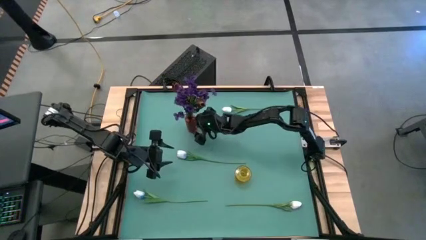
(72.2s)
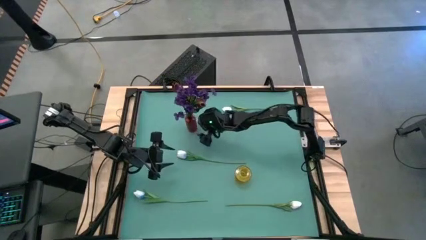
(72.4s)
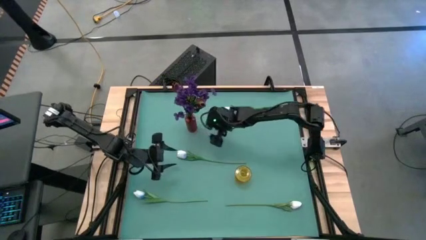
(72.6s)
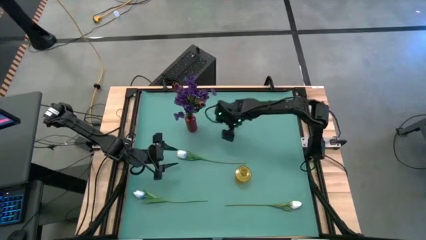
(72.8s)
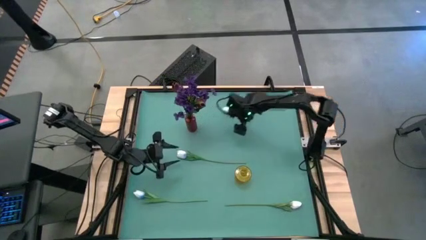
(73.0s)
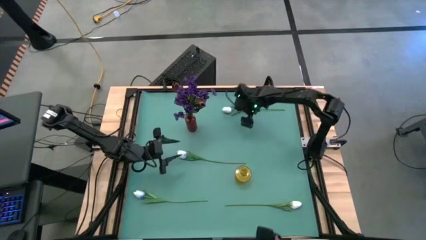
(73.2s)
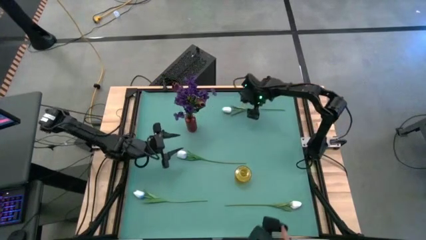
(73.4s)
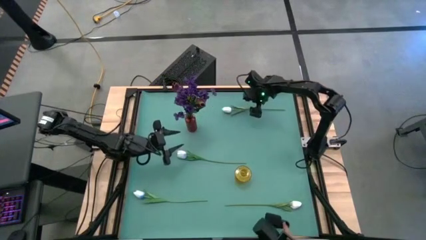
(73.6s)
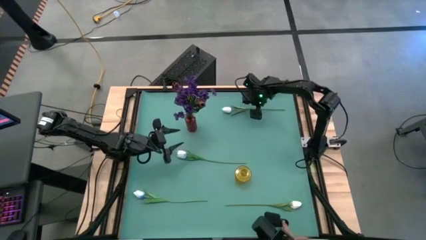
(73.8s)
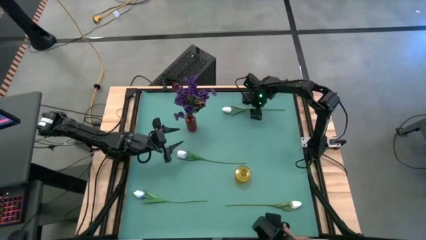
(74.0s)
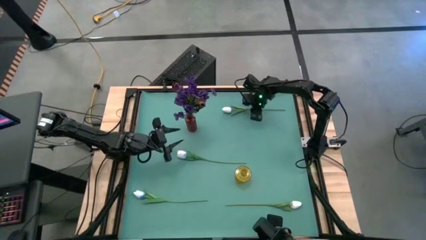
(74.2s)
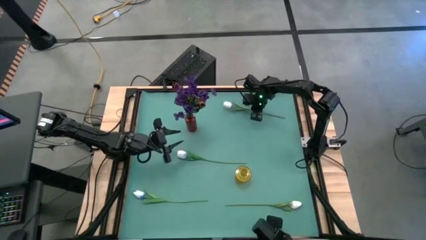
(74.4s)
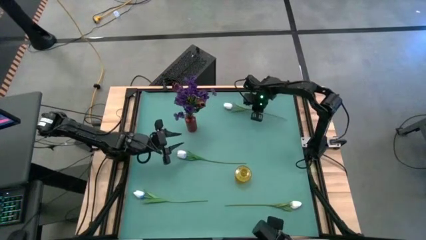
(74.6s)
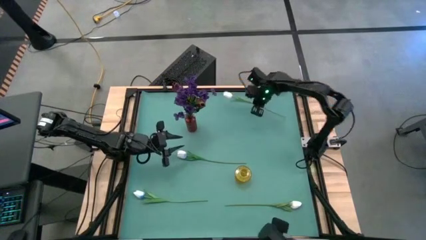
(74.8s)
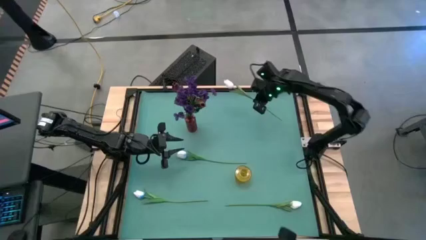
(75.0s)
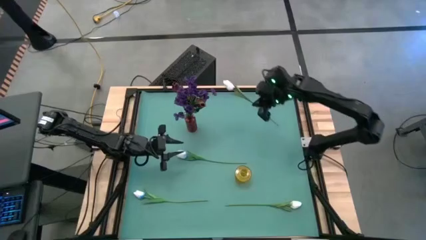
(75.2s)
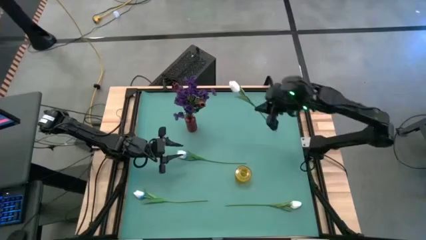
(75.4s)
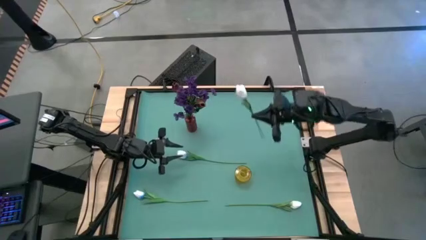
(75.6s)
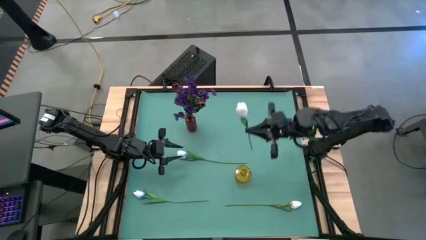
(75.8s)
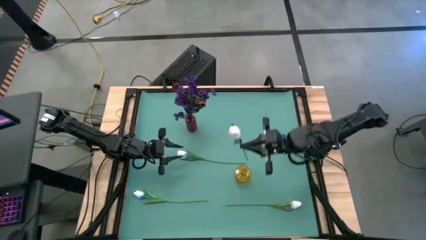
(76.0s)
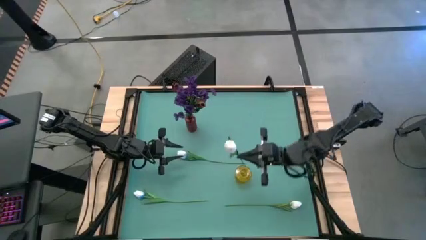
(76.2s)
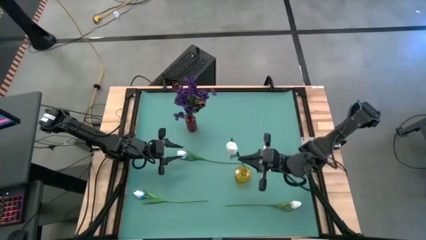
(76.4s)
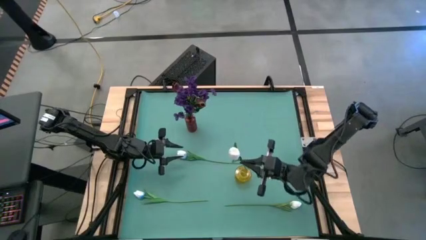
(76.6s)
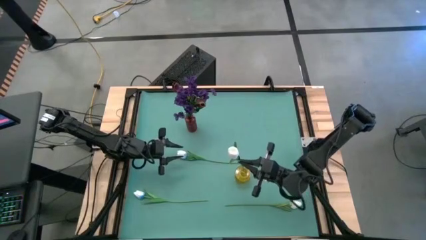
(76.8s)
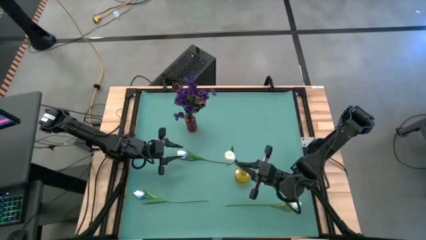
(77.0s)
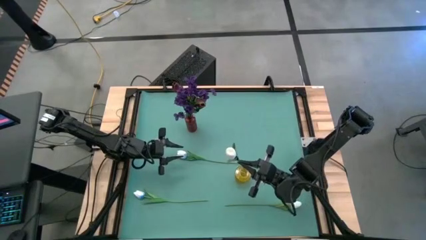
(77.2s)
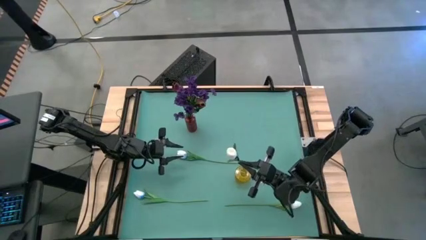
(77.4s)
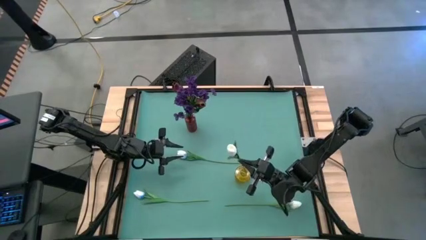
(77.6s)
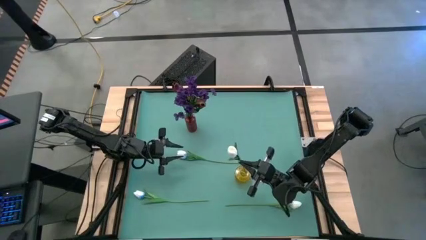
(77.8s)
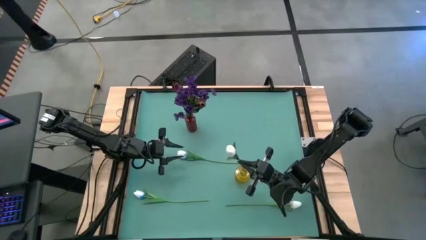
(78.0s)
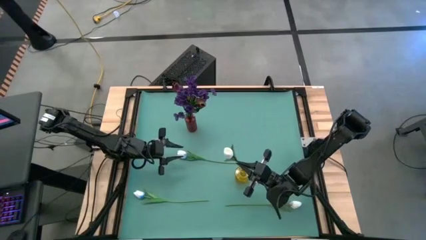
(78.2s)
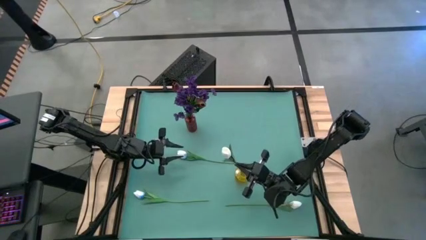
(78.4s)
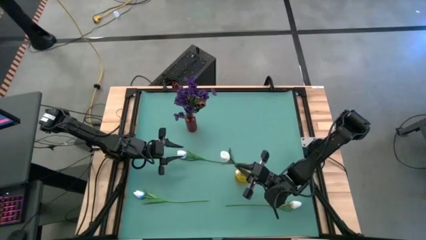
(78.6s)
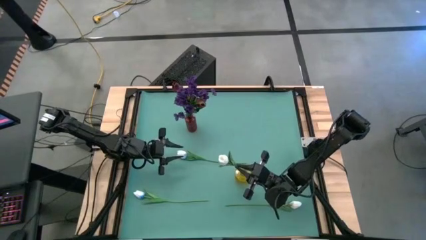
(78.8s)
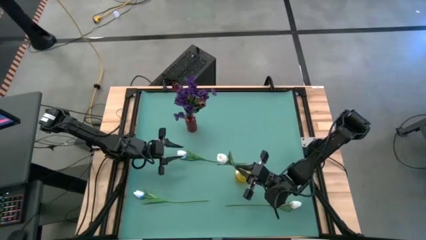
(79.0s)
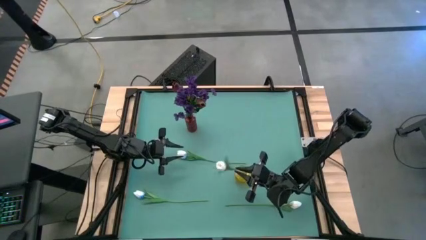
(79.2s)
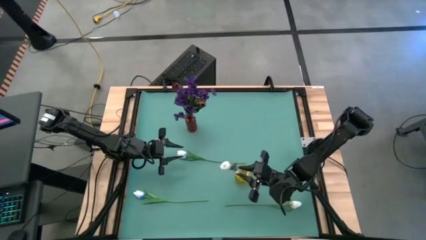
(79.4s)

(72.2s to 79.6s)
Task: Sort flowers into vase by color
Put the top white flower into the yellow flower vase

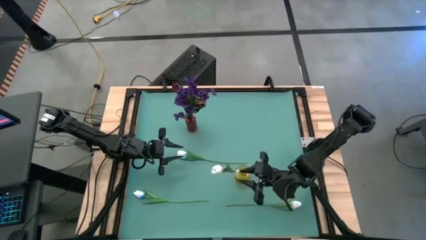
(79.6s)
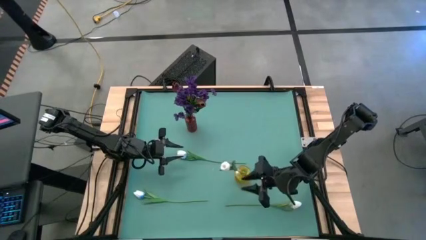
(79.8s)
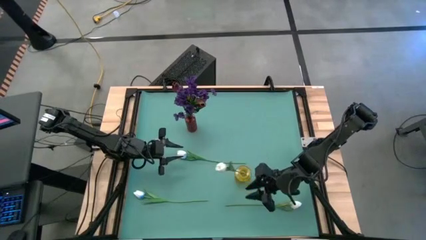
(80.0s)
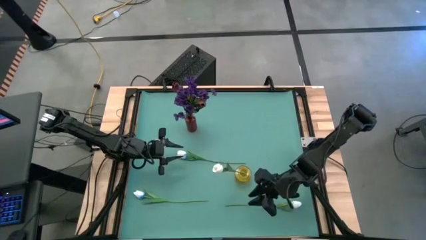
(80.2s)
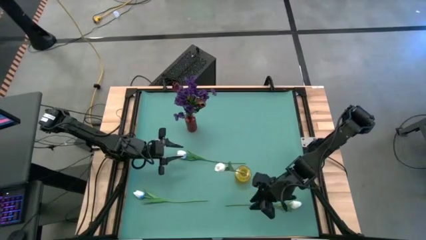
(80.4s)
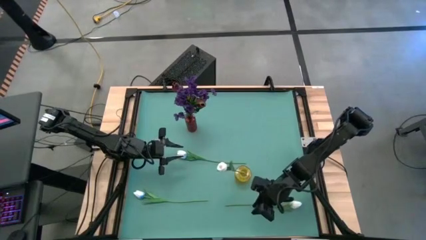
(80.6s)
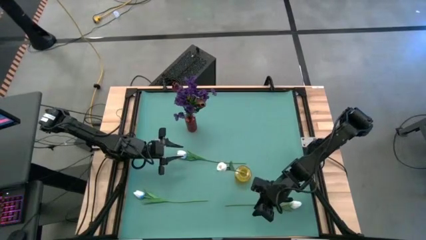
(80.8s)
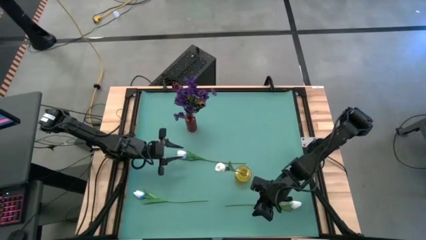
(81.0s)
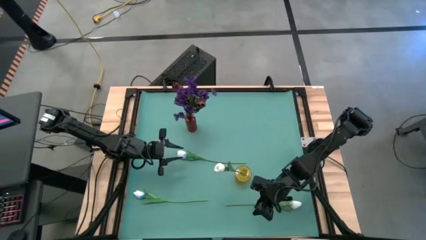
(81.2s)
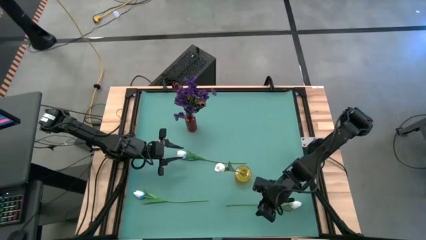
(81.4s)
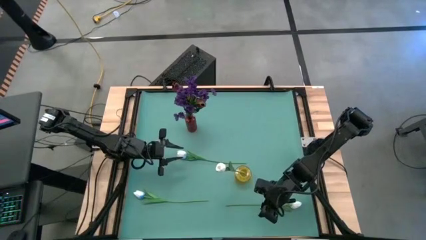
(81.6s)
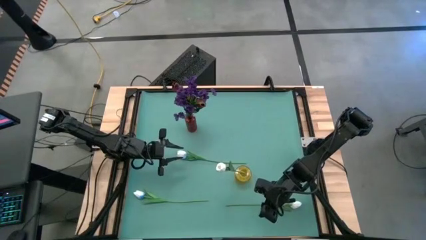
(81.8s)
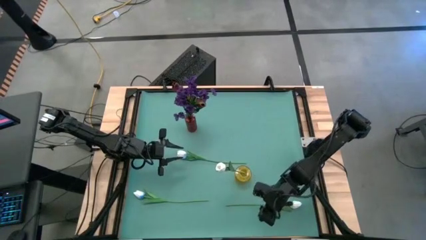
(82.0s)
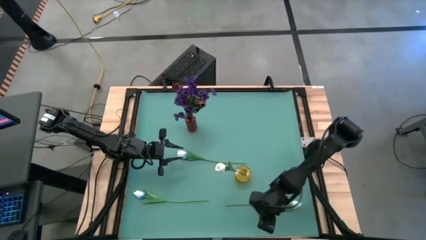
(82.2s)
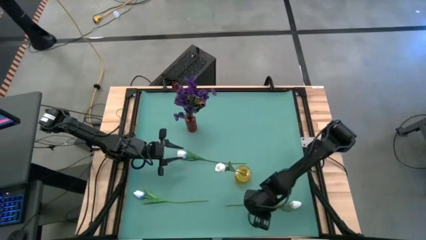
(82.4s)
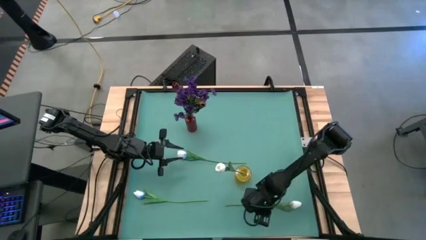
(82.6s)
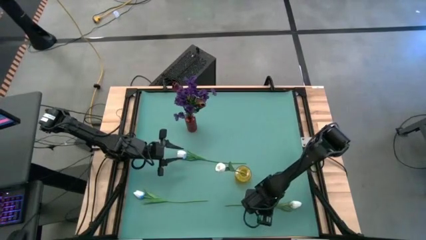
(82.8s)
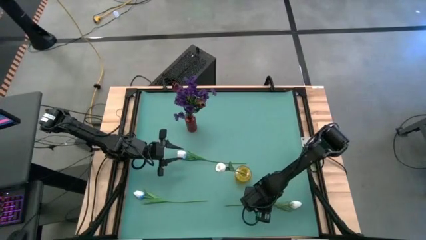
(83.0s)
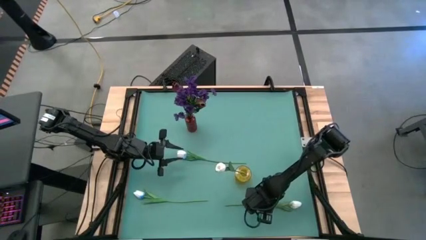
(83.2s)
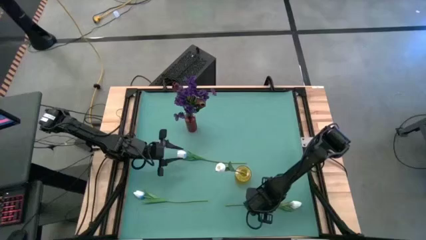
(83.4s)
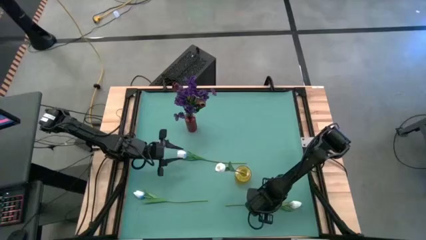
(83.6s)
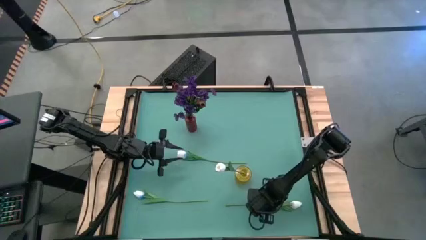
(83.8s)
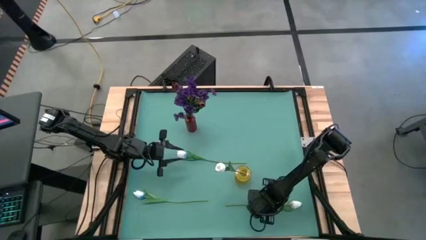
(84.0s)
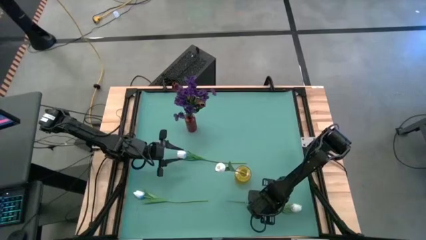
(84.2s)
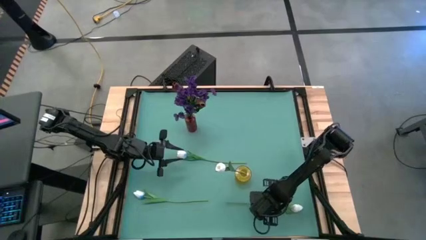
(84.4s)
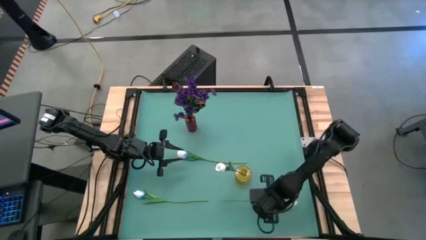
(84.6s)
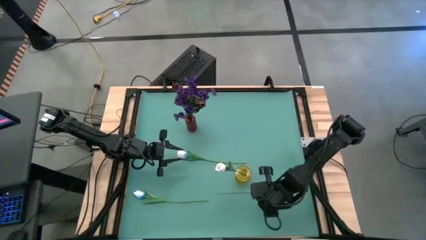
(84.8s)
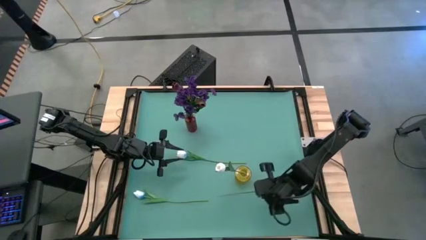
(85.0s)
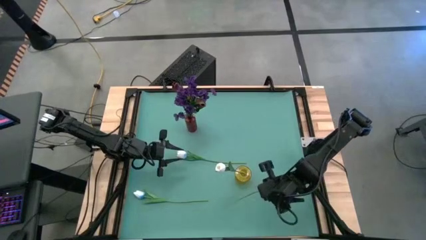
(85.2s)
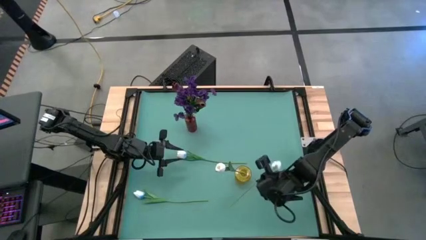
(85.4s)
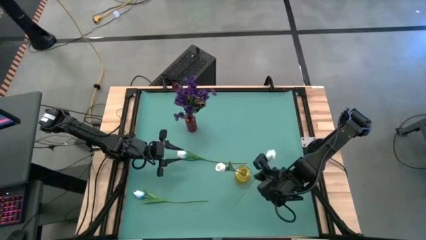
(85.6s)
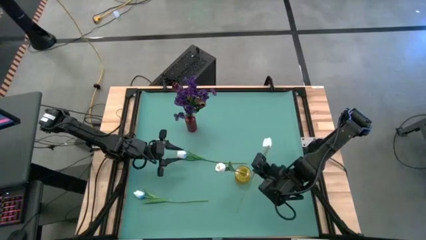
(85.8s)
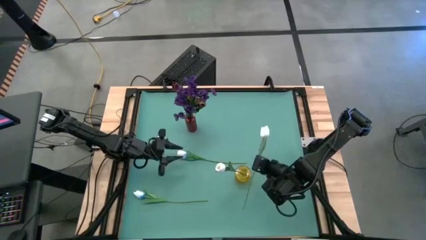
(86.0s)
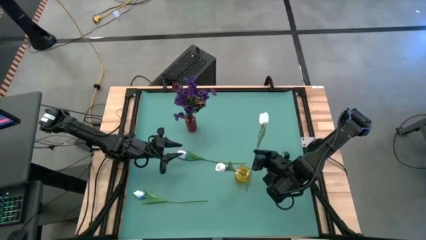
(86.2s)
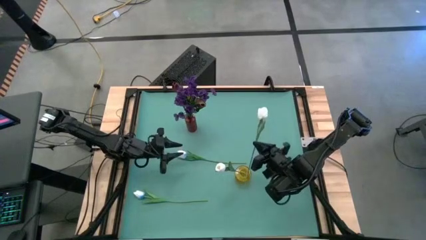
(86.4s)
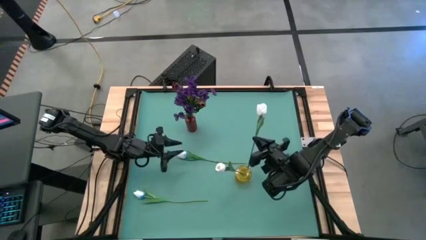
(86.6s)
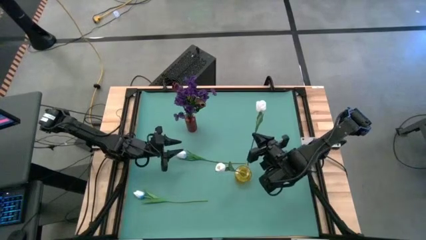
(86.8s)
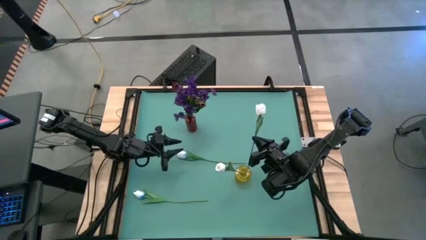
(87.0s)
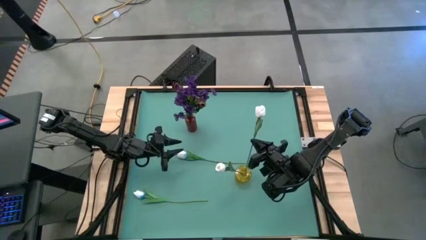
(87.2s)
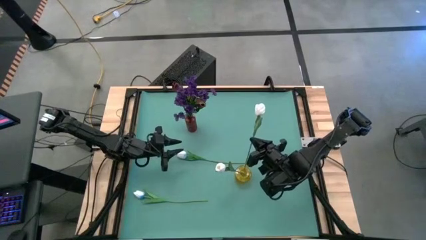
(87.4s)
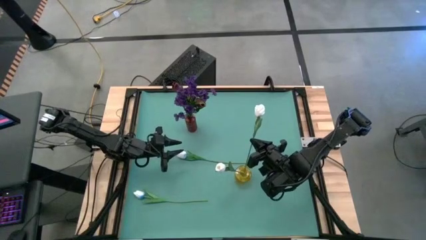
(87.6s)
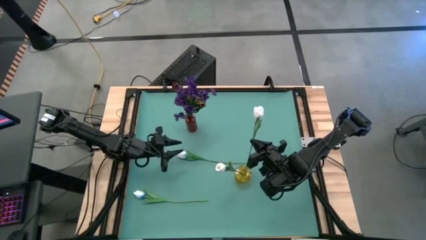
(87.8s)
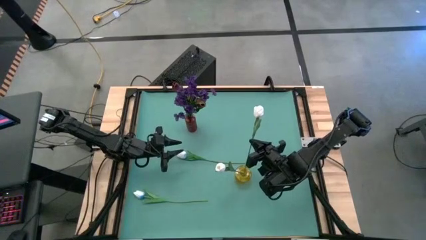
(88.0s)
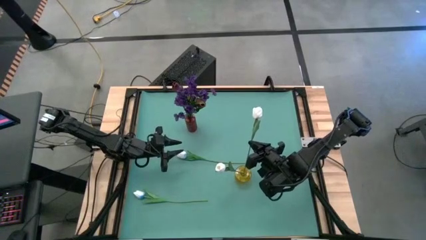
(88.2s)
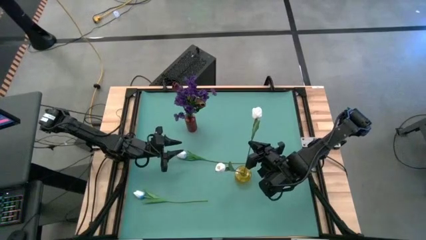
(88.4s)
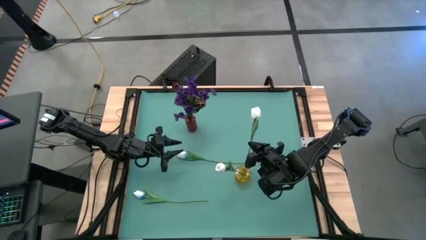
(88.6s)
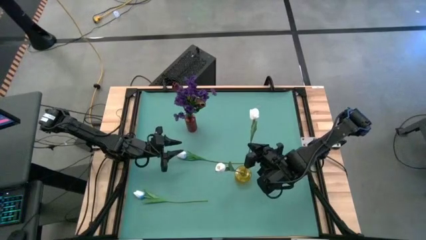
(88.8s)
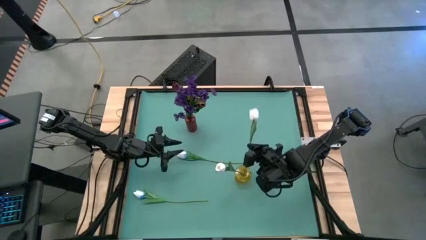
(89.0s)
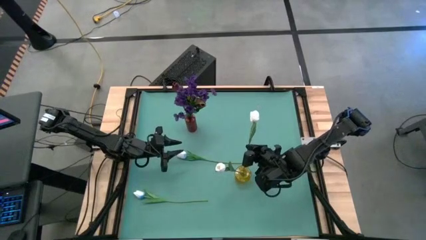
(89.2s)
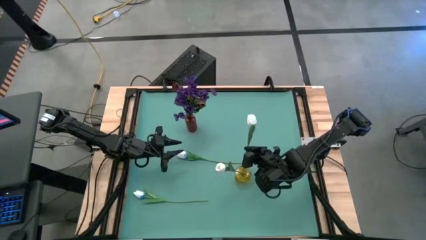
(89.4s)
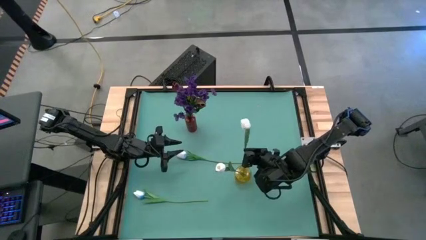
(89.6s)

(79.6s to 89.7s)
Put the white flower into the yellow flower vase
